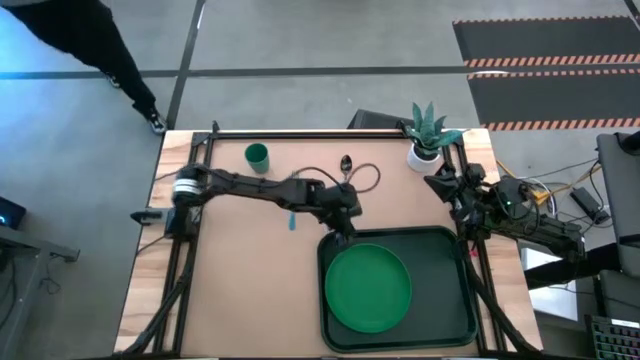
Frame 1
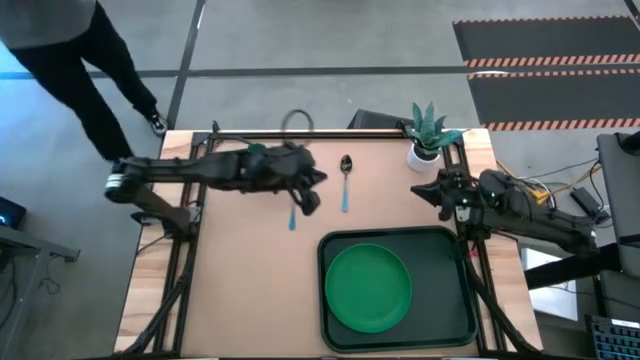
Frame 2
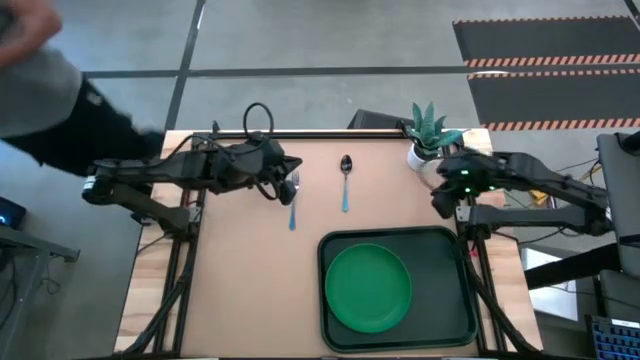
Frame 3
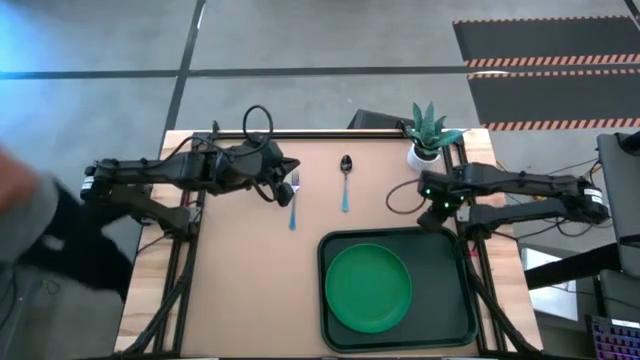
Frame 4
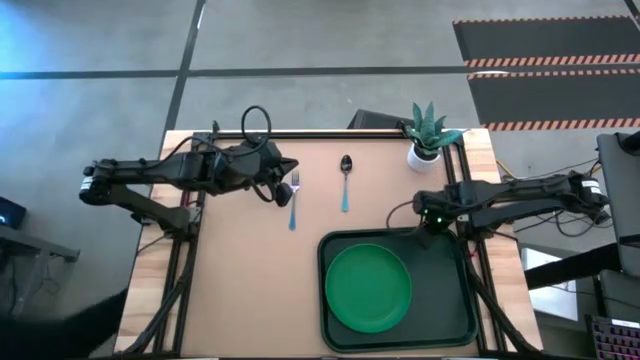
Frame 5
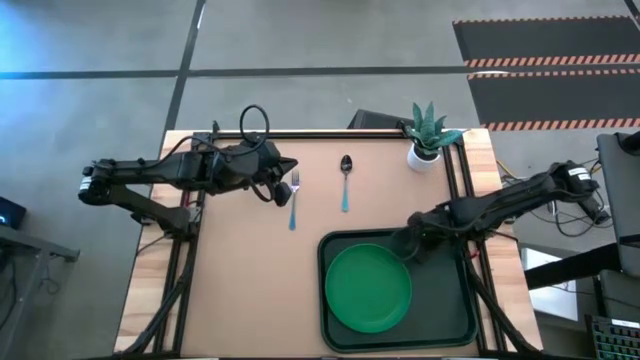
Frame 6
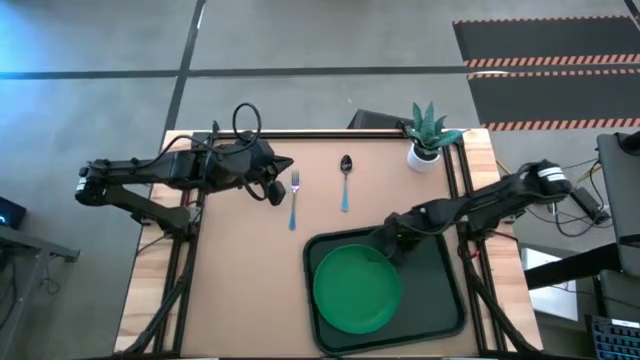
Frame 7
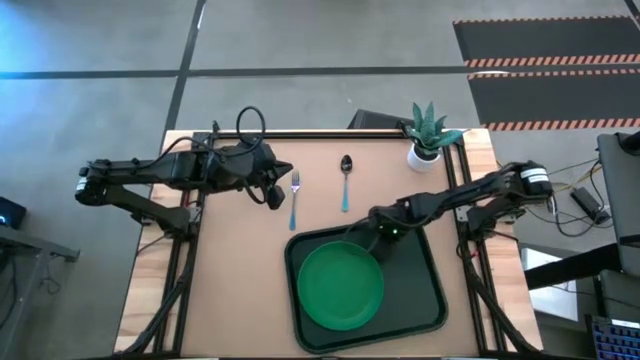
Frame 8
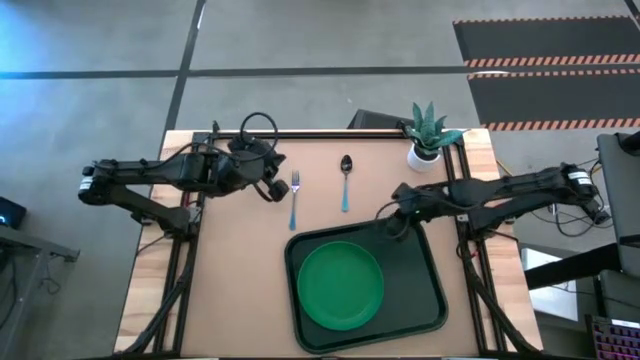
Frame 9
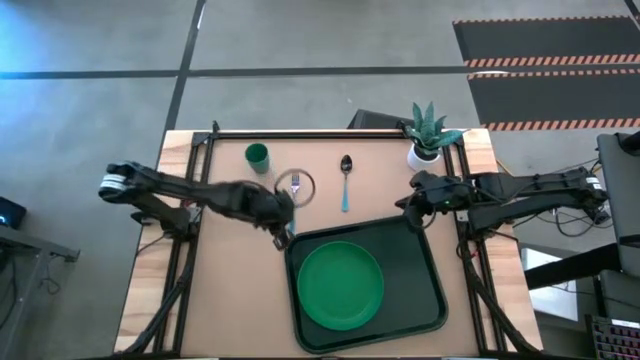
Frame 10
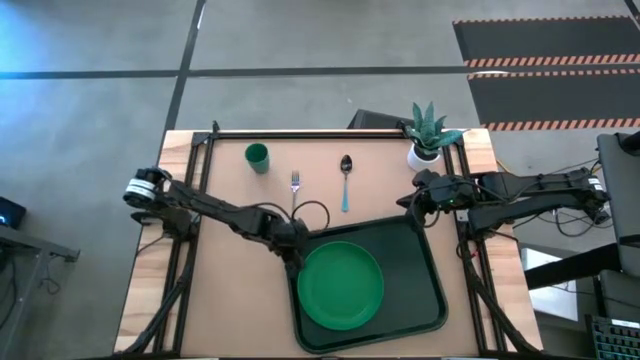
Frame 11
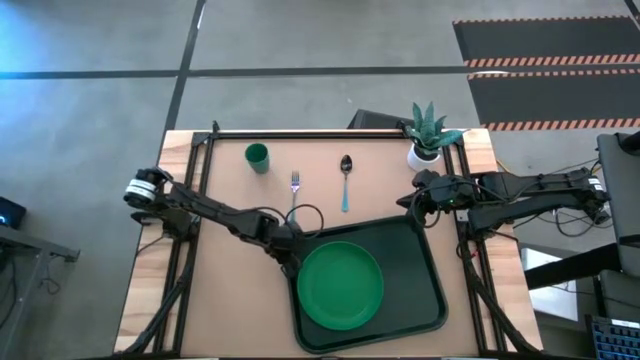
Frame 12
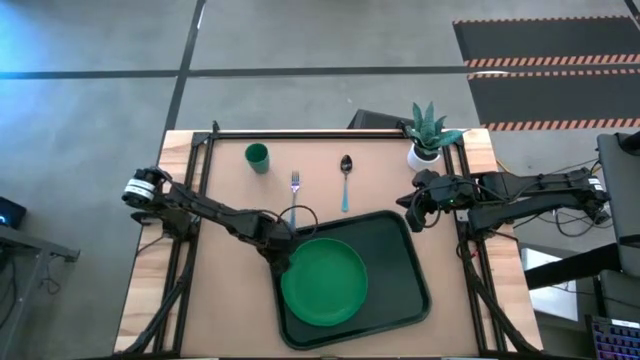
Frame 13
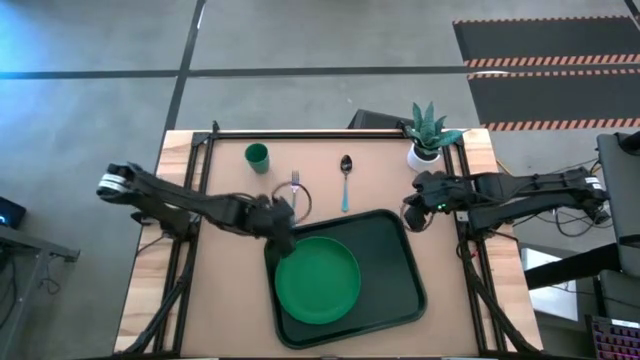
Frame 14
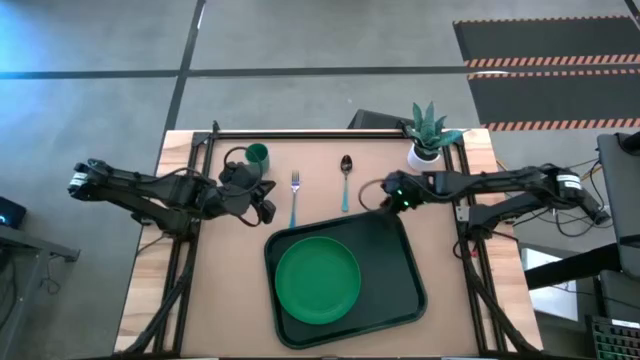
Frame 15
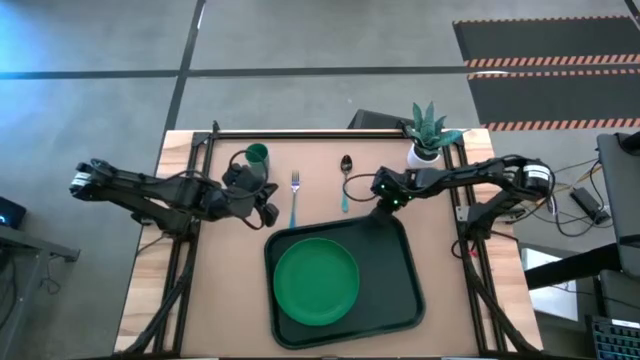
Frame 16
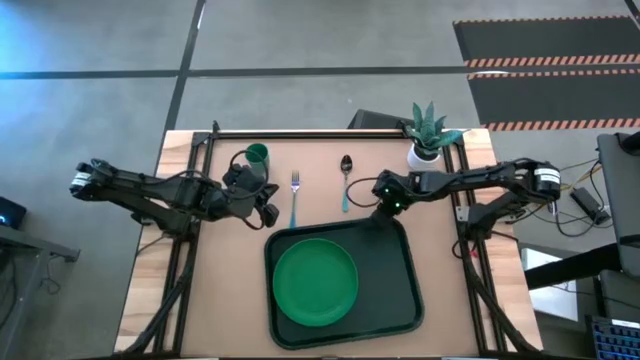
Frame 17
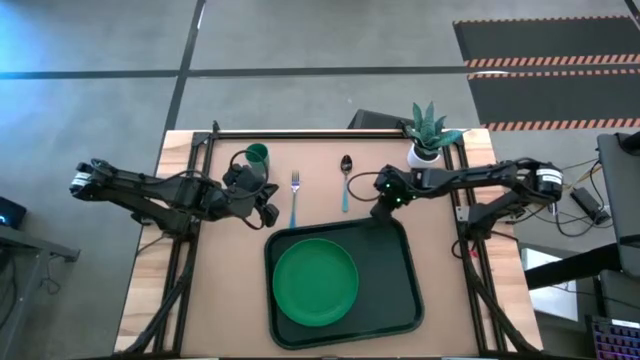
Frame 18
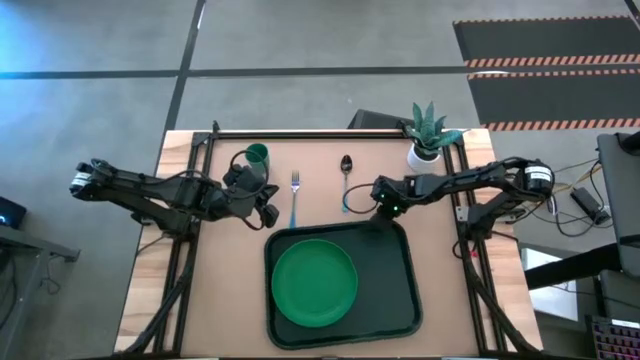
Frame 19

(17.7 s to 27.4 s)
Task: Pick and place plate/cup/fork/spoon on tray
Adjust the green tray

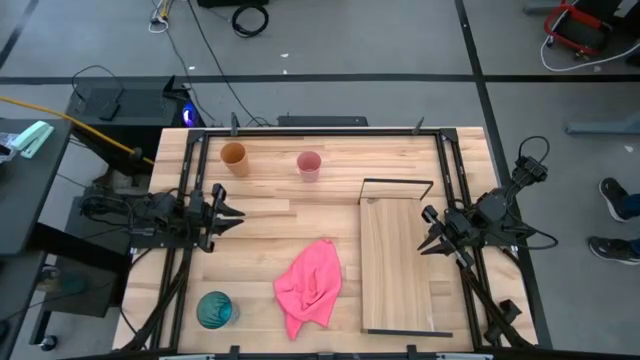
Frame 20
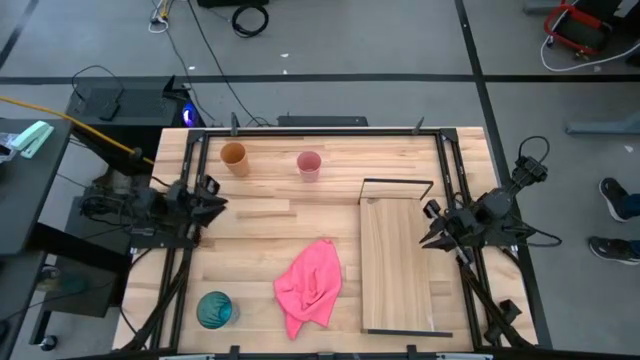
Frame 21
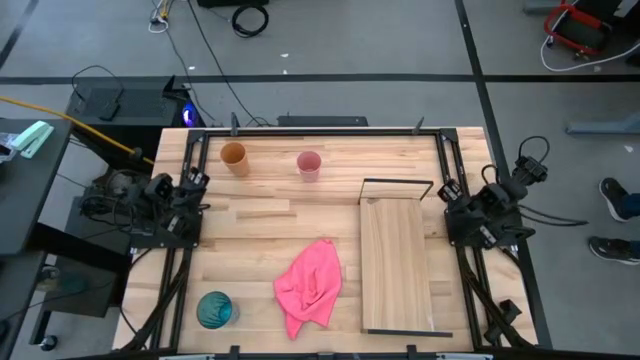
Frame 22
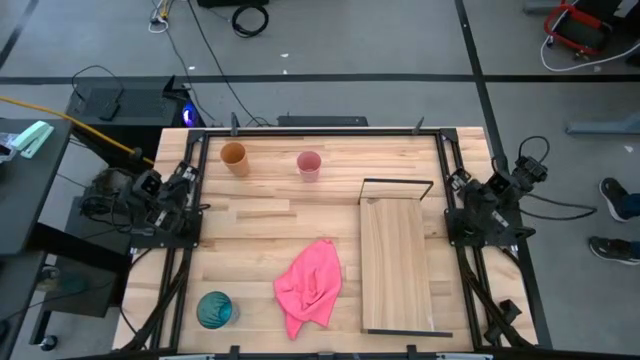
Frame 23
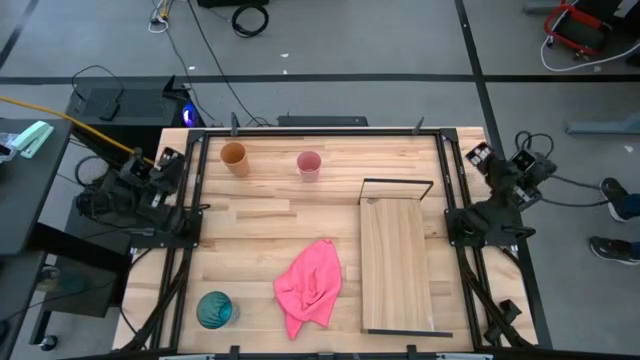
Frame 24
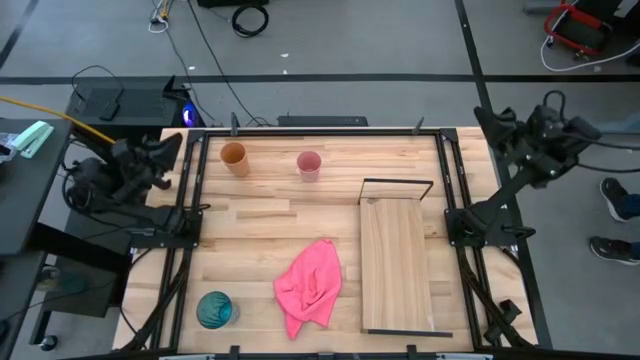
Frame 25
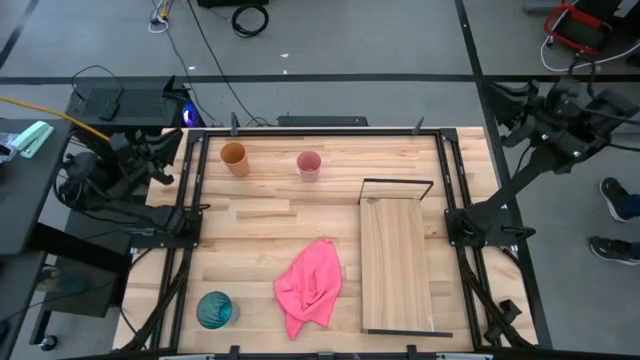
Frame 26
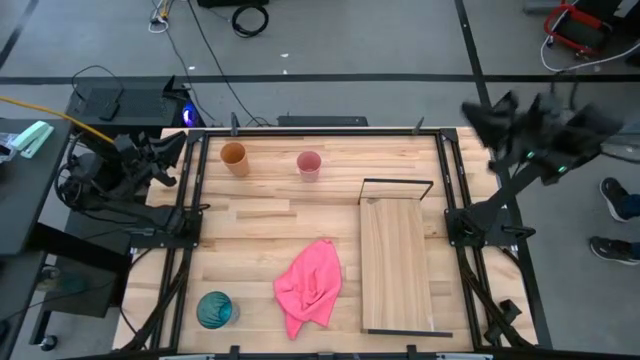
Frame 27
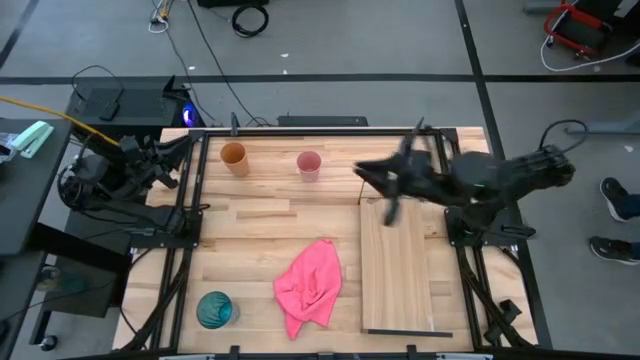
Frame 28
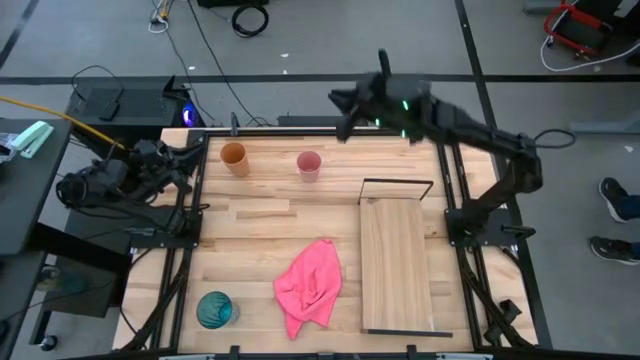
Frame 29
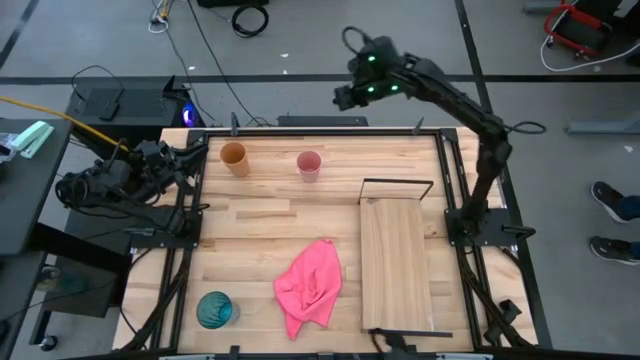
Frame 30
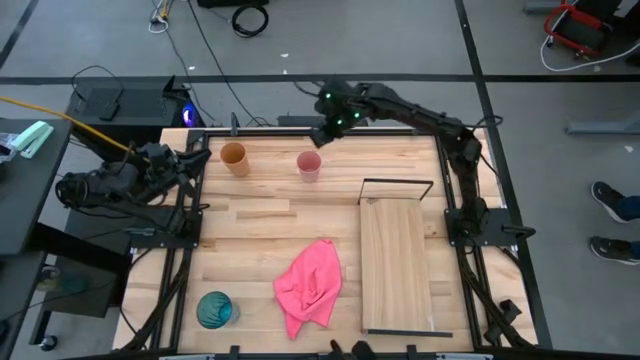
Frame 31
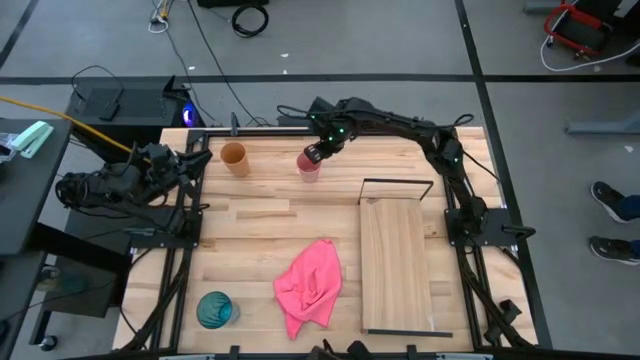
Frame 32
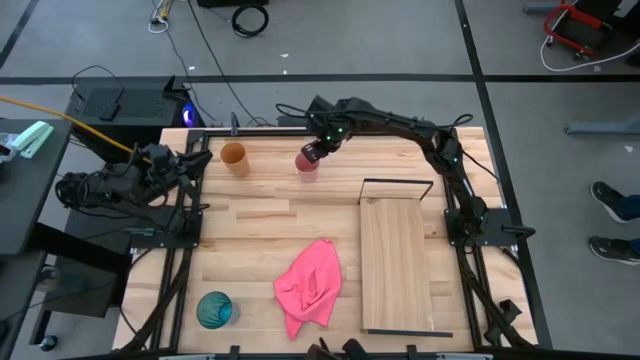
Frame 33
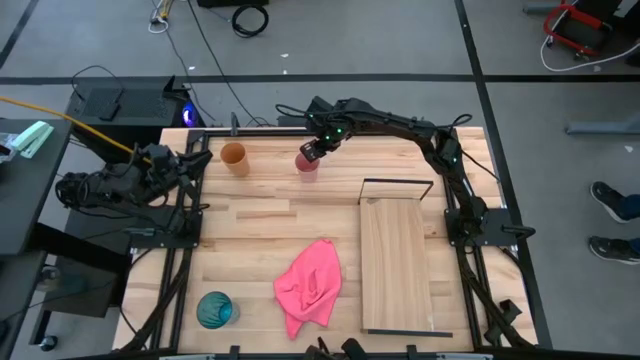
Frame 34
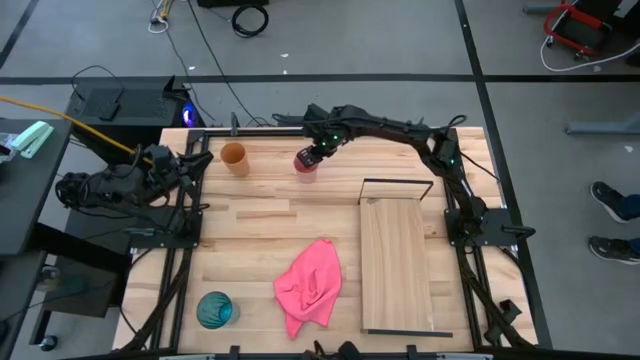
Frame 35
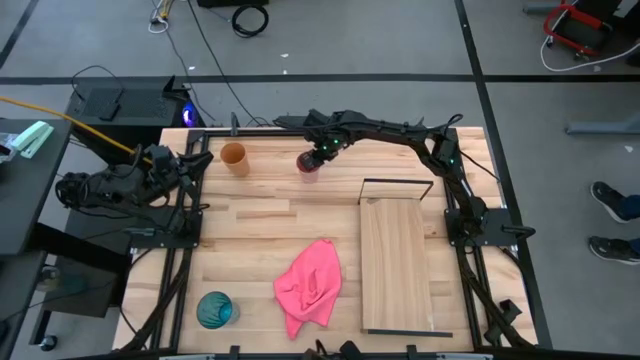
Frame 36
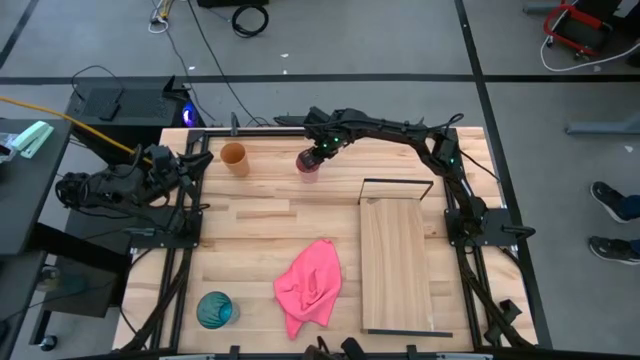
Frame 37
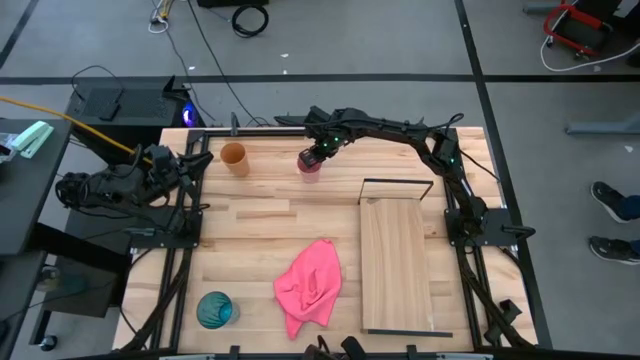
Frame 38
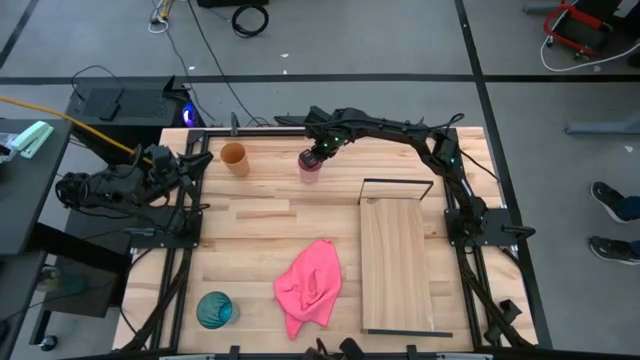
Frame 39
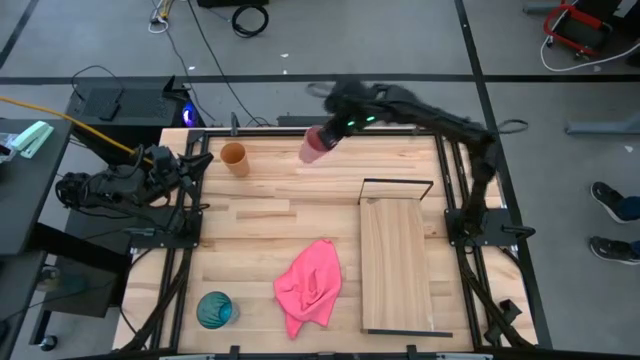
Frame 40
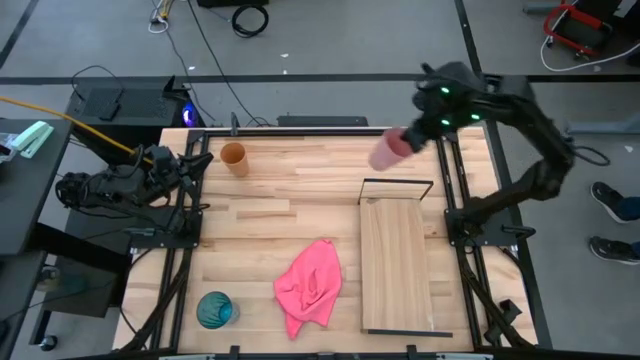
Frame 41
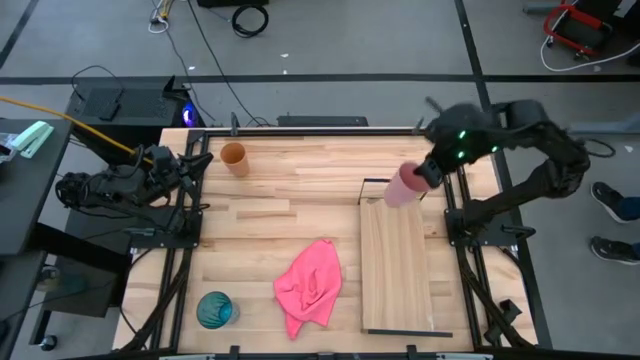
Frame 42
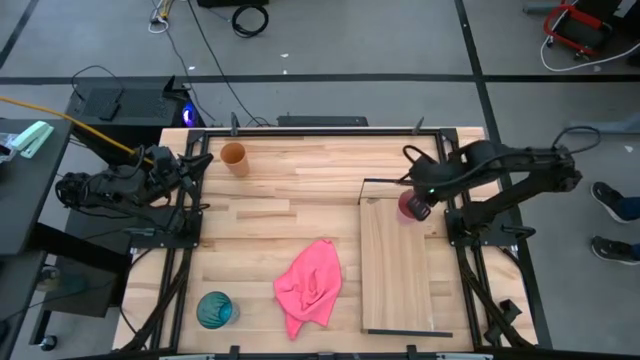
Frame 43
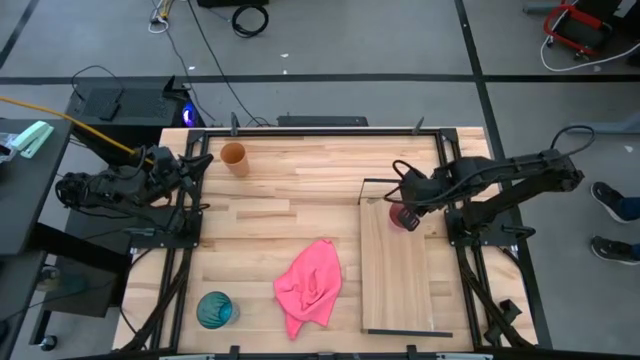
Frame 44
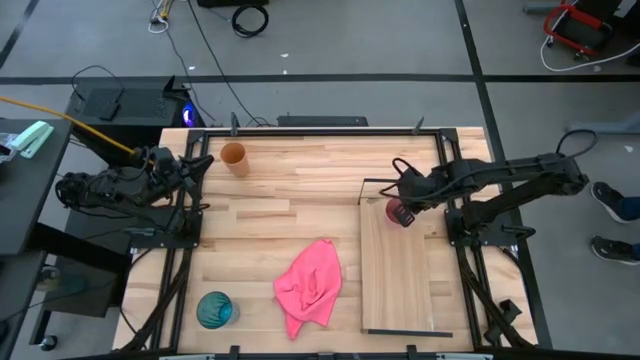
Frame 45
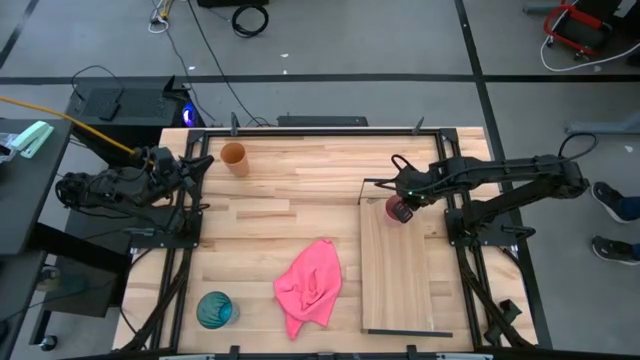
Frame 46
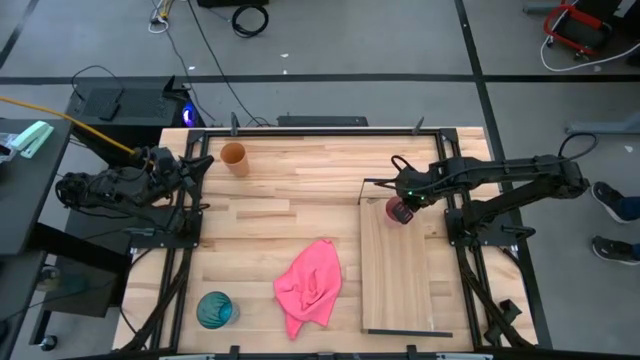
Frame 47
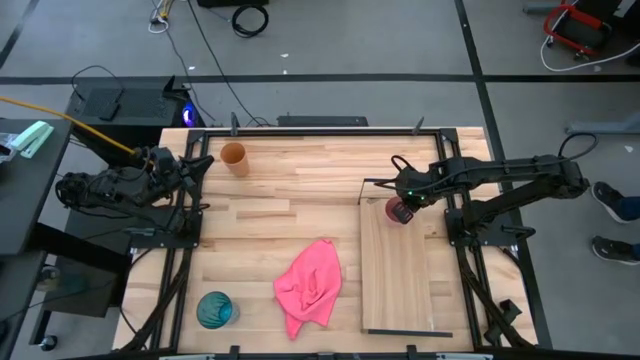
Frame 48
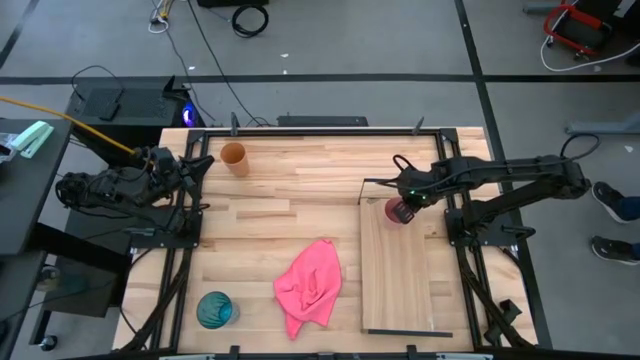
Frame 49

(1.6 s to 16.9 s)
Task: Stack small to large cups/mugs on shelf
Put the pink cup on the shelf
